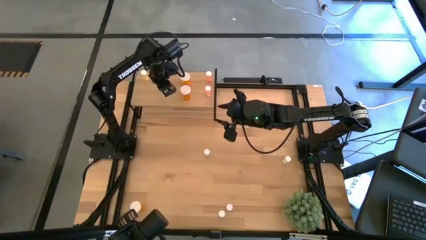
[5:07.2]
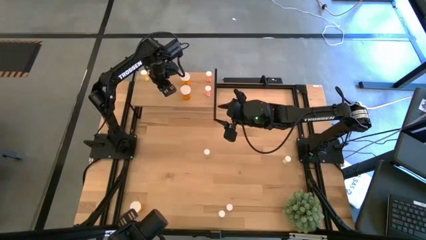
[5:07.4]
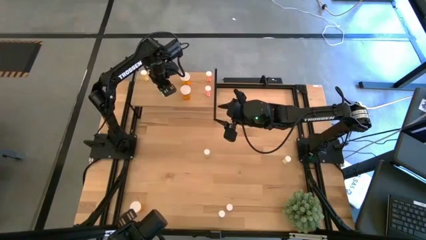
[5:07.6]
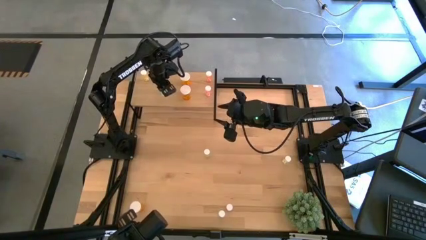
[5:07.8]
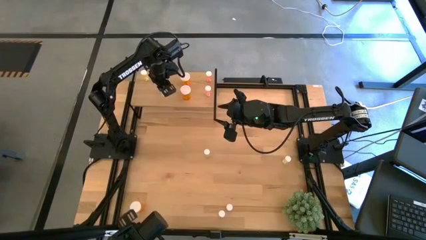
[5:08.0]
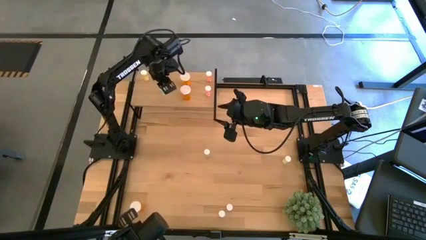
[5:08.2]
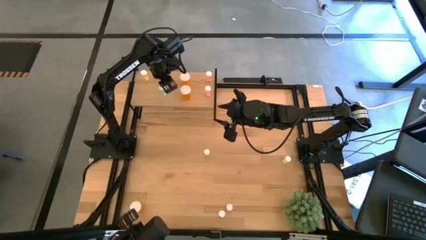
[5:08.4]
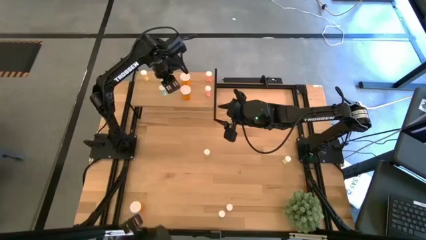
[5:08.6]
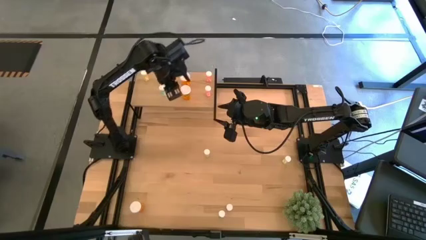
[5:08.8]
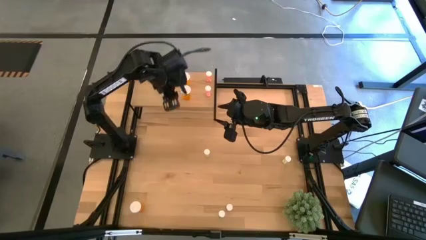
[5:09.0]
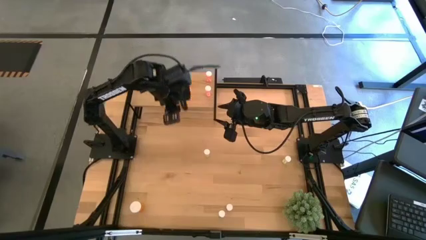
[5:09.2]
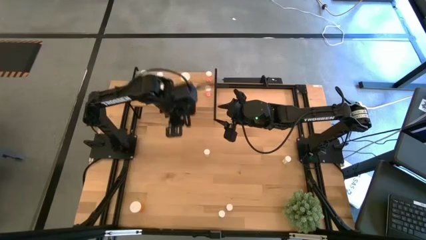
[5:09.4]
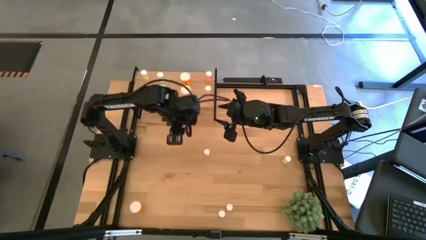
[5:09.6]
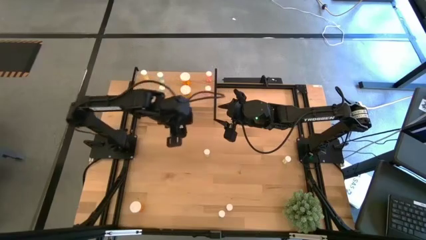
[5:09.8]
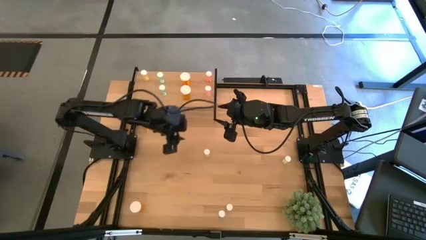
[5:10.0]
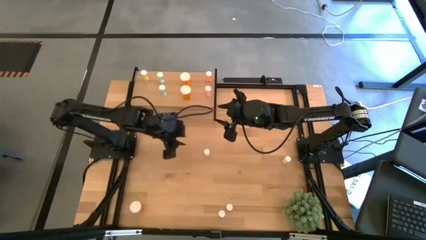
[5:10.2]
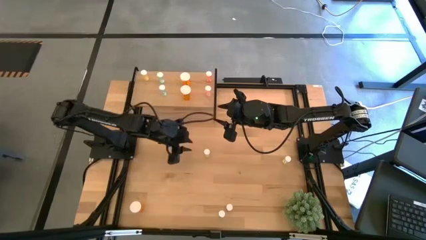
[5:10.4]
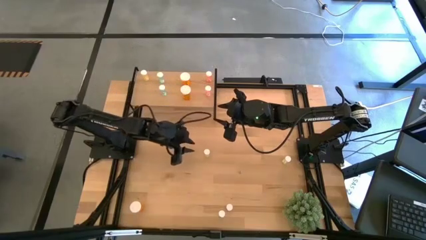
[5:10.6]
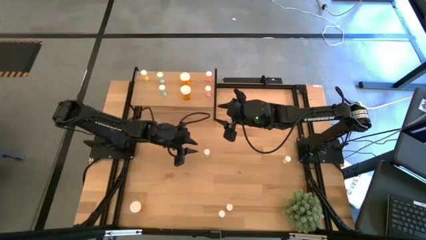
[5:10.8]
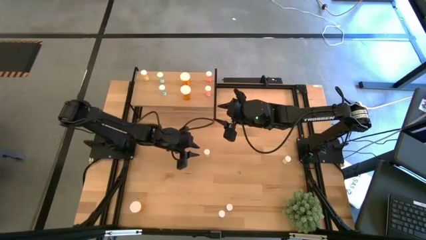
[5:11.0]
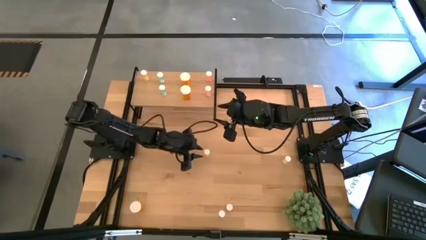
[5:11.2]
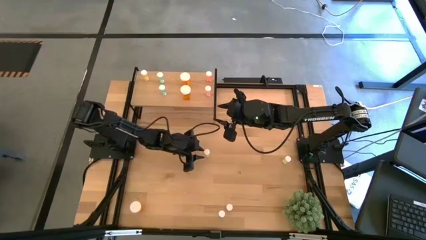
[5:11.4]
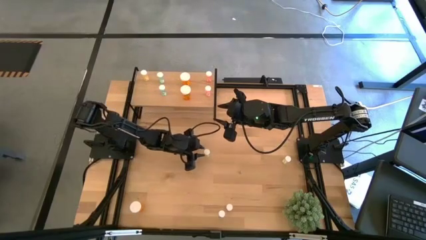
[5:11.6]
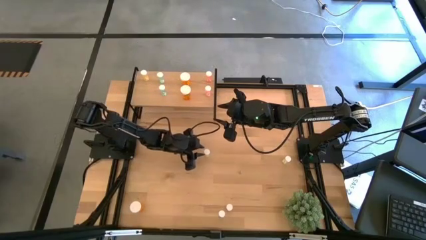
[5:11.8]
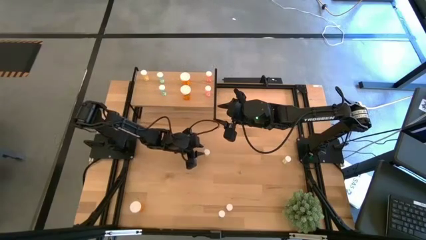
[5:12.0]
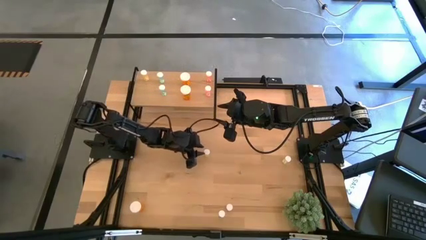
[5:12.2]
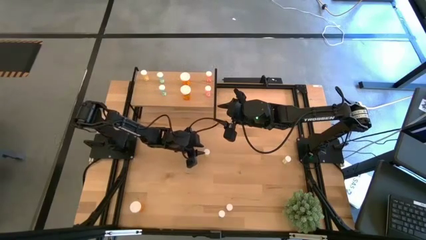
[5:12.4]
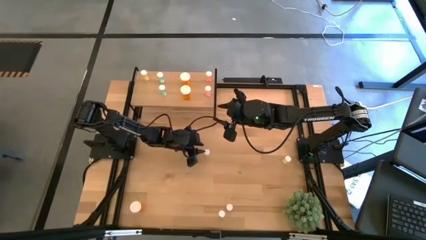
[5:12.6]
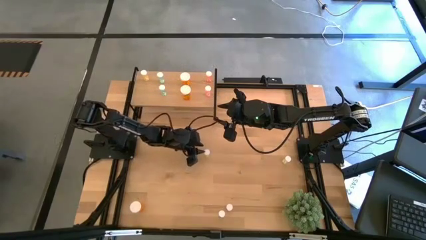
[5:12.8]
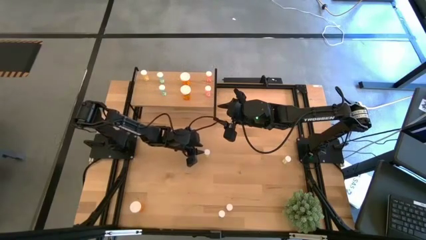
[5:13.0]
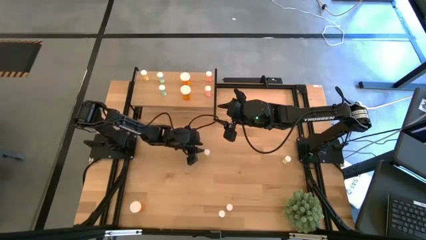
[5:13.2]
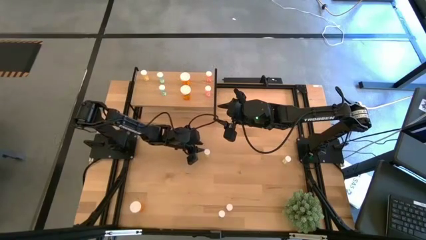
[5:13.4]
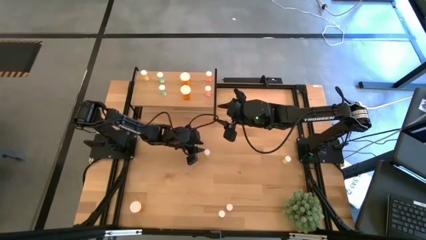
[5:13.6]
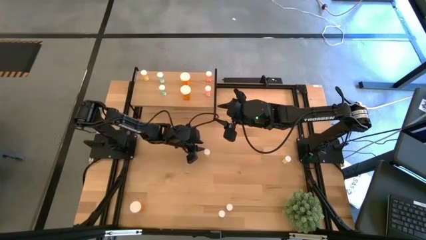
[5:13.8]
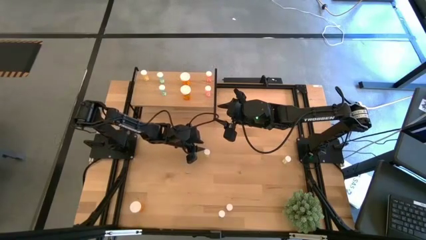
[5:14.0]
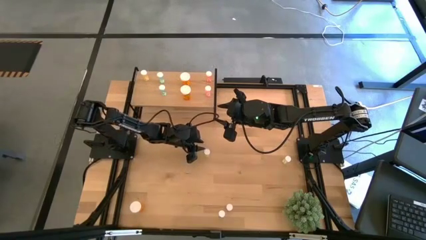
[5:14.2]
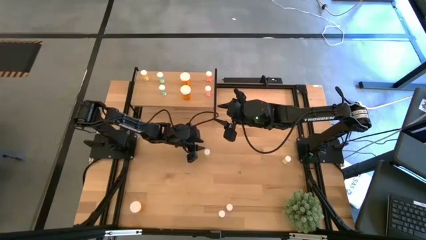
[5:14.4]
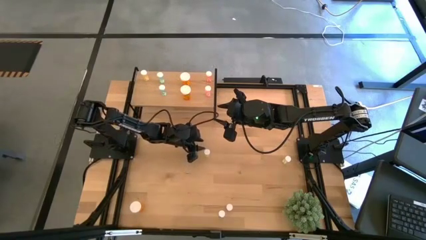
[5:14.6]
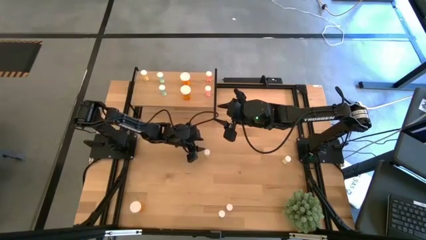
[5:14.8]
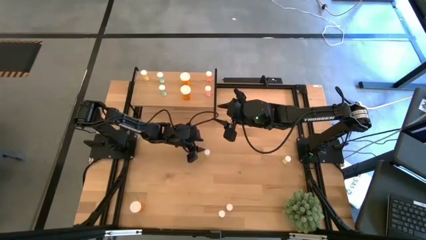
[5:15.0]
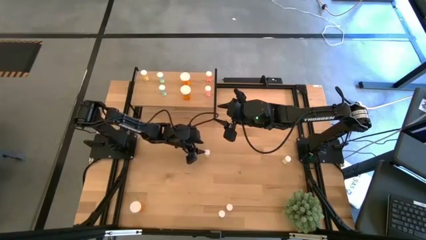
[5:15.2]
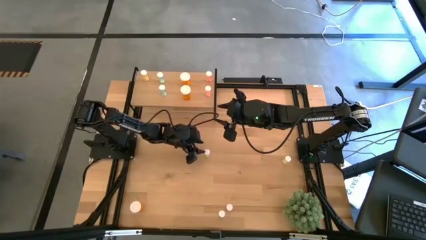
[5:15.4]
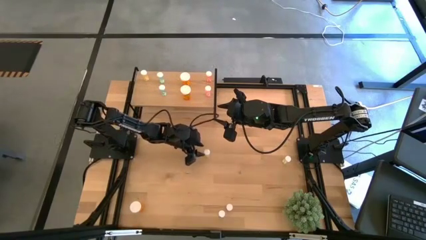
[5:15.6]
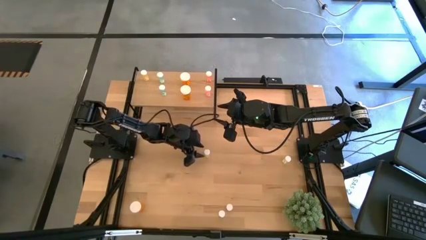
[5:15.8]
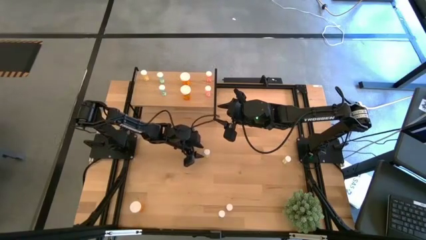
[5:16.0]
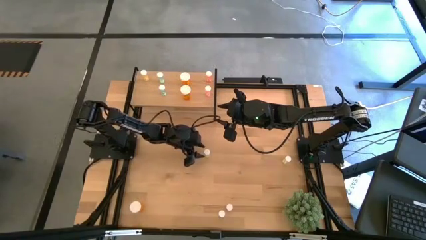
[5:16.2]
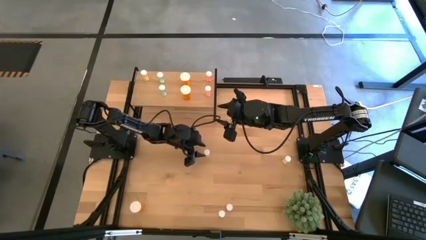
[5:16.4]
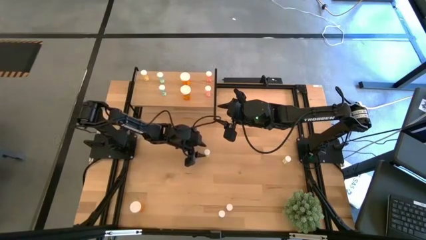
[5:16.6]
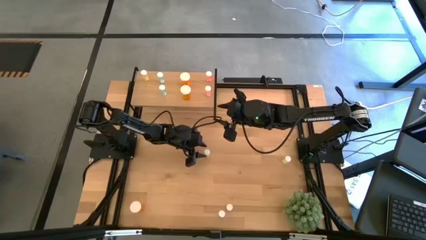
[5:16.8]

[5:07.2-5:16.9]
Task: Pick and place medicine bottles onto shelf by color
Put the left small yellow pill on the shelf aligned with the yellow pill on the shelf

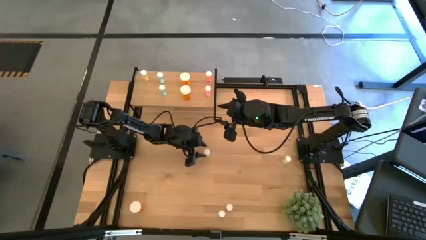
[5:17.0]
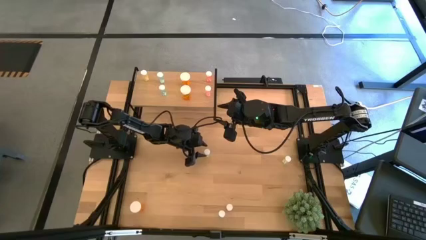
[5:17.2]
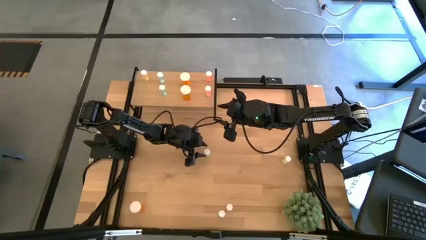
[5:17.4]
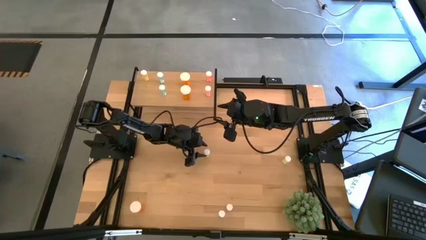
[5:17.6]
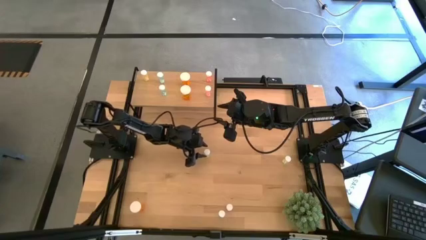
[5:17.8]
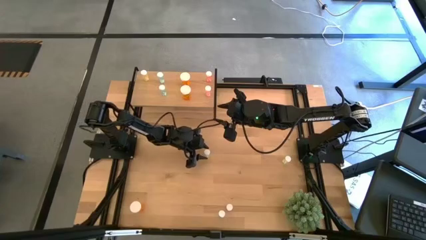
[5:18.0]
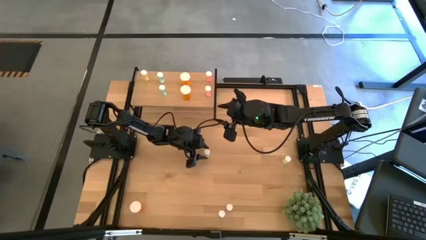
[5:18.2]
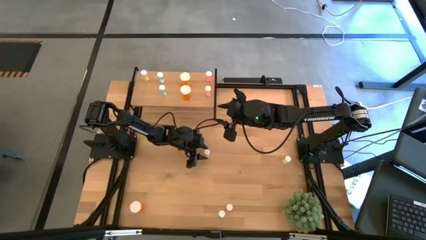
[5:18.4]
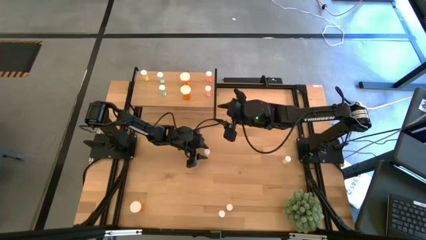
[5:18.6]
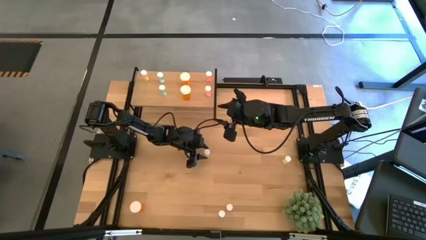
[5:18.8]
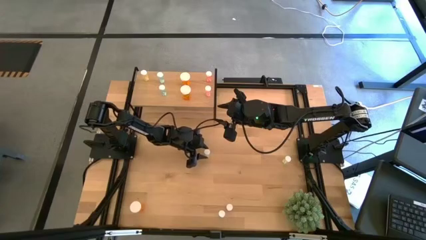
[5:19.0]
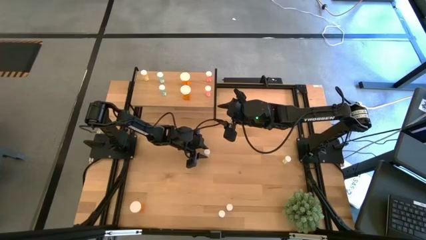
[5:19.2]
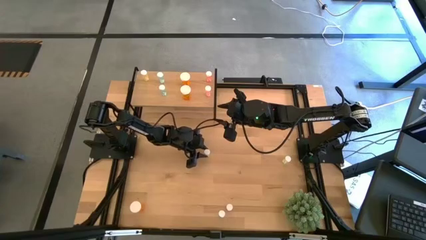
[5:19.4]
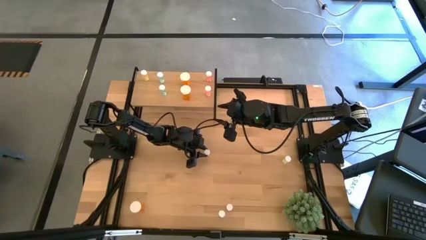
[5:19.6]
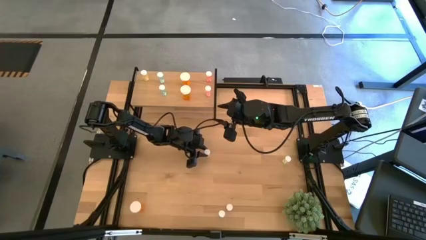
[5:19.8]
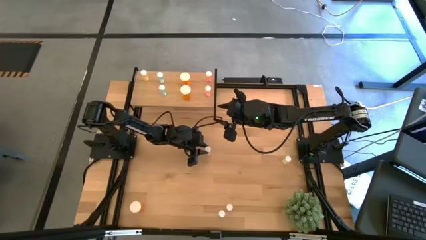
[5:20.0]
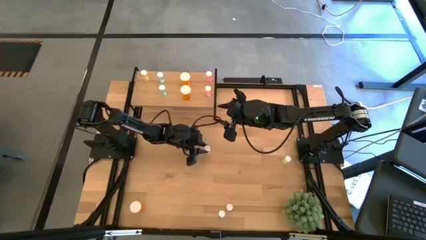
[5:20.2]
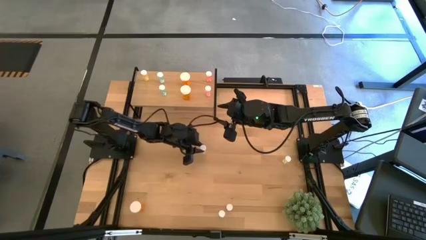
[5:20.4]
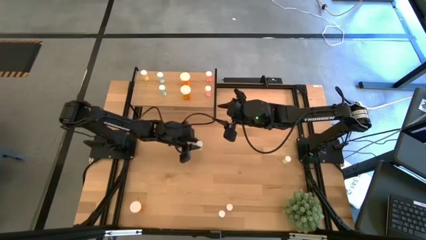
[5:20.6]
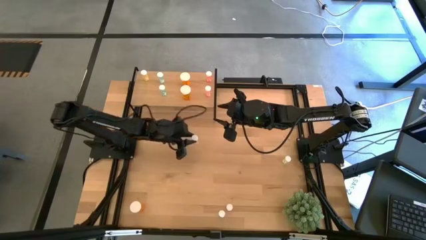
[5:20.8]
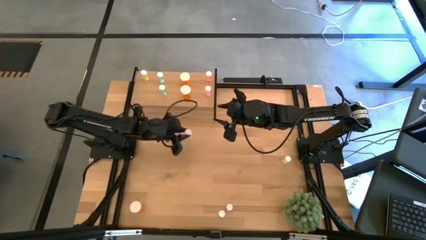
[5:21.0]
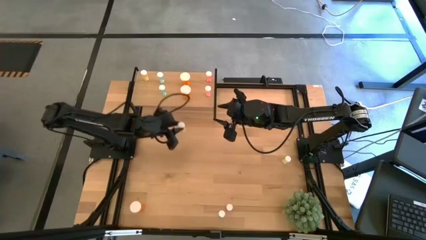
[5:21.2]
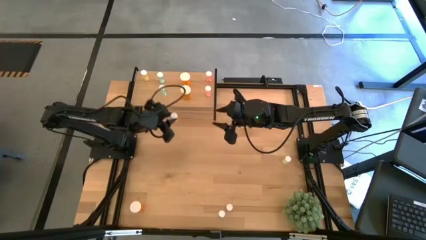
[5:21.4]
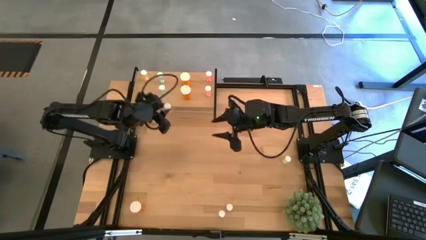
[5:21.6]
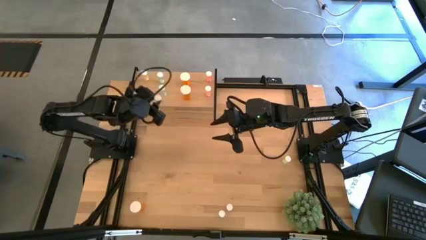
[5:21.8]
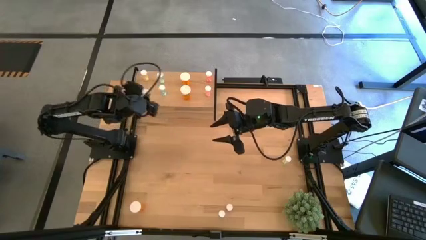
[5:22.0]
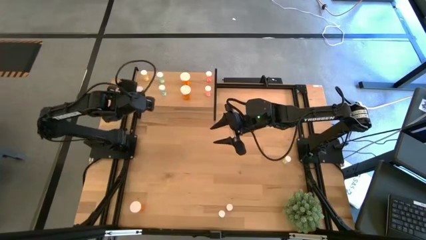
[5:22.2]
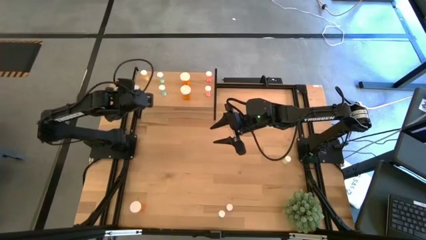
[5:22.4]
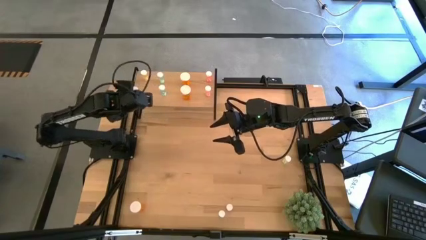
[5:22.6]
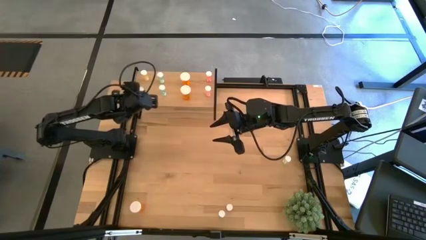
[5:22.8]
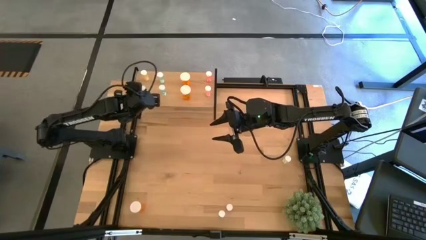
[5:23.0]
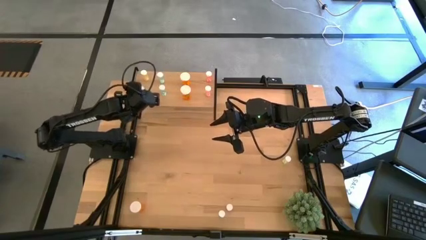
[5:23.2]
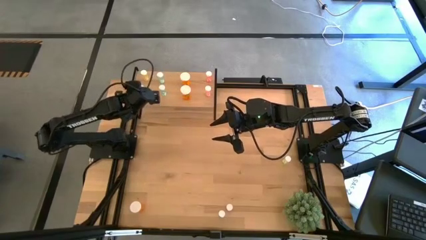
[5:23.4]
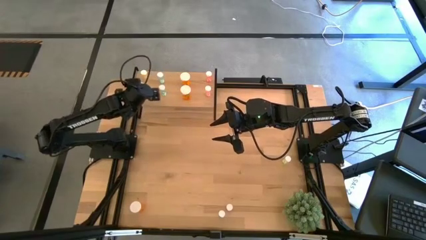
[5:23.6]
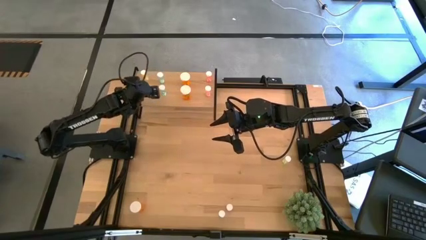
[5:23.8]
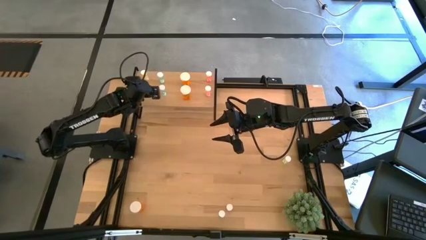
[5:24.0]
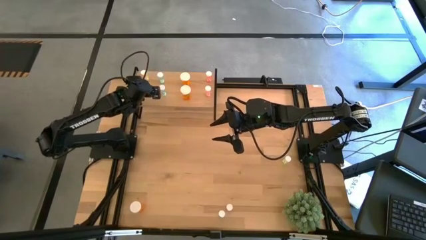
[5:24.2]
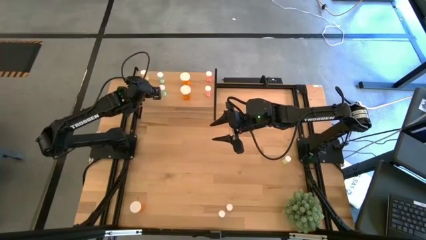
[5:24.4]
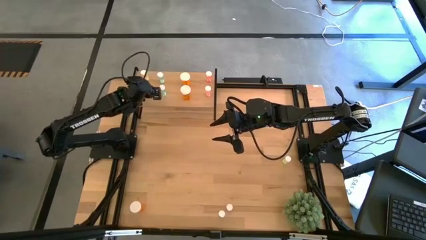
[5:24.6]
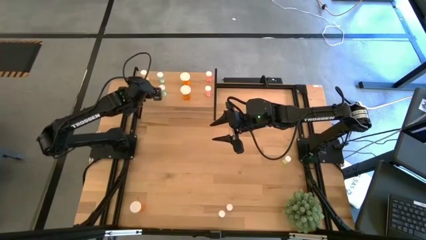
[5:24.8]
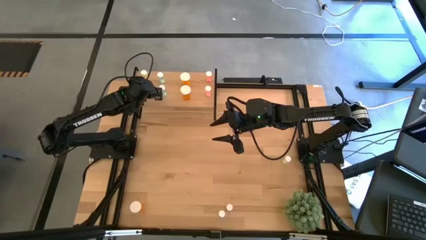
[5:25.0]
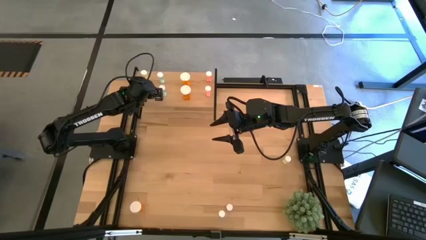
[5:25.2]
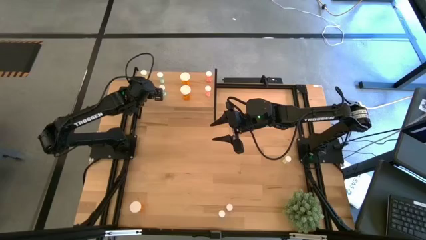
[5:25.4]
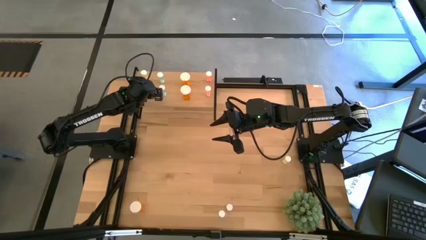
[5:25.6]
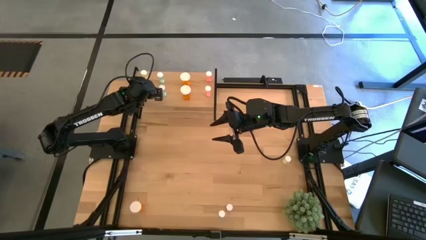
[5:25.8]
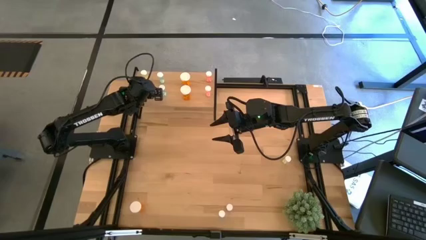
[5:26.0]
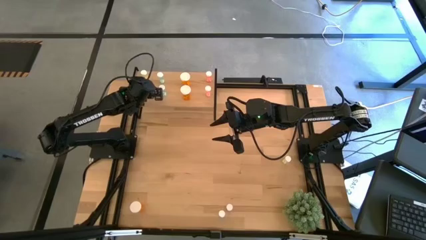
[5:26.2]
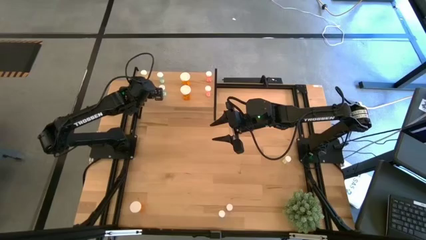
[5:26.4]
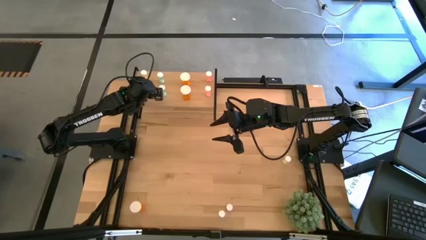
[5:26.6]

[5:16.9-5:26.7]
Put the left small yellow pill on the shelf aligned with the yellow pill on the shelf
